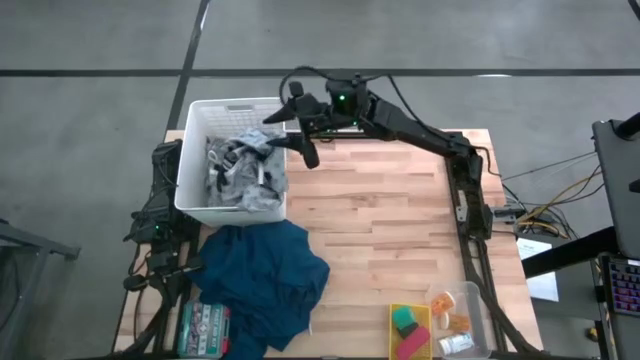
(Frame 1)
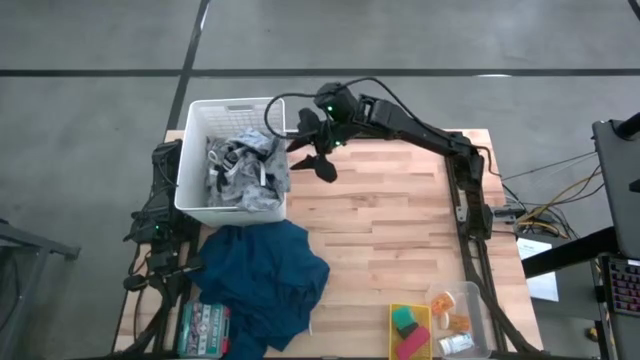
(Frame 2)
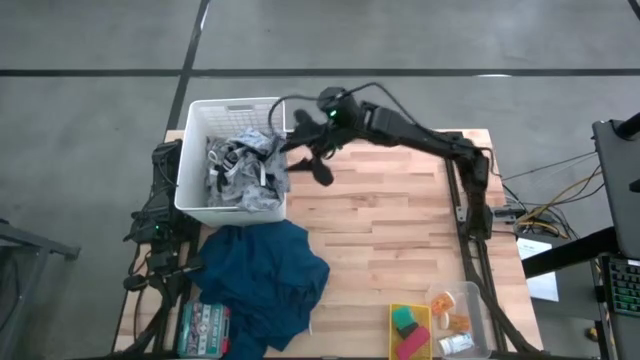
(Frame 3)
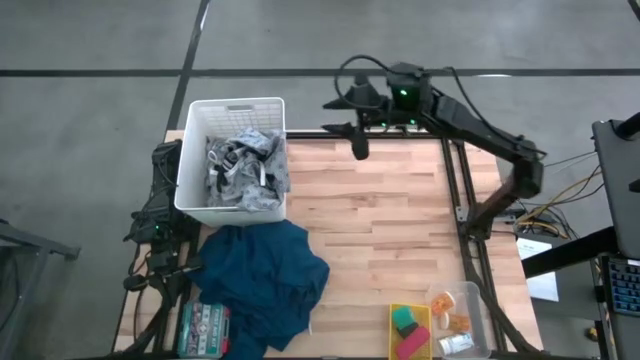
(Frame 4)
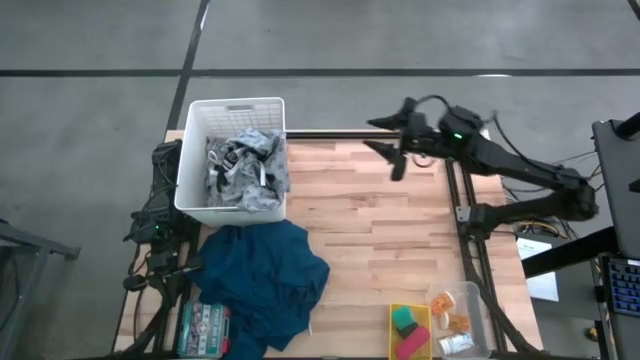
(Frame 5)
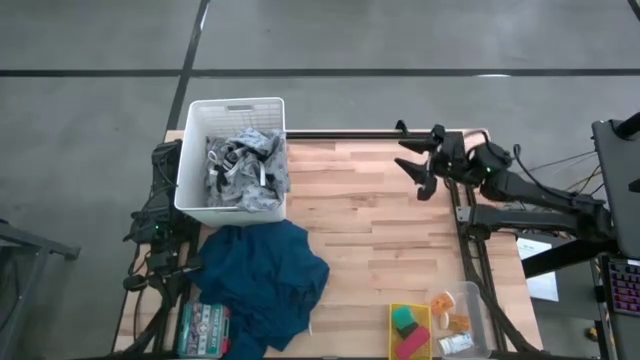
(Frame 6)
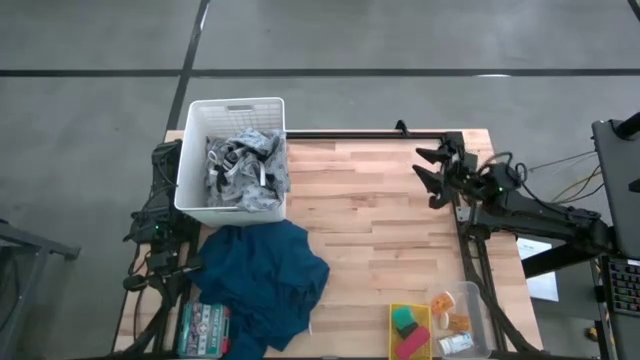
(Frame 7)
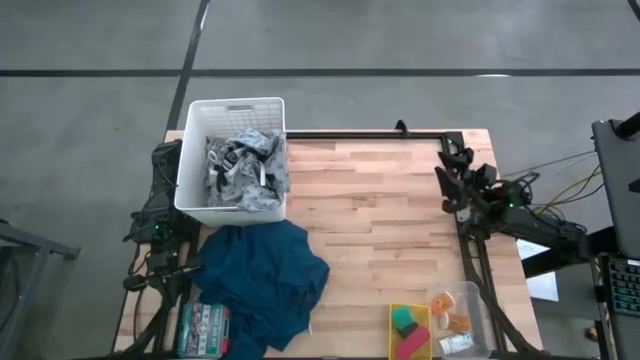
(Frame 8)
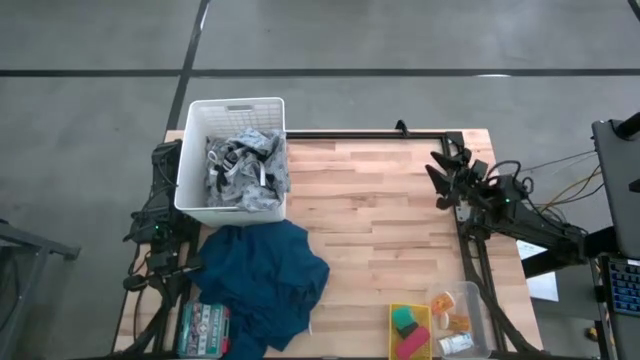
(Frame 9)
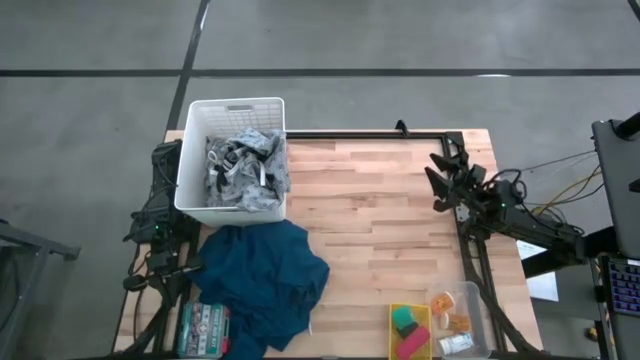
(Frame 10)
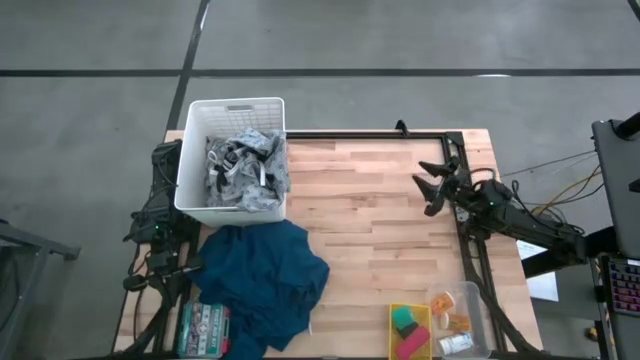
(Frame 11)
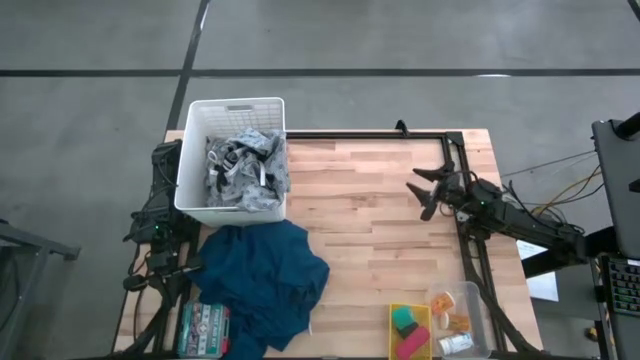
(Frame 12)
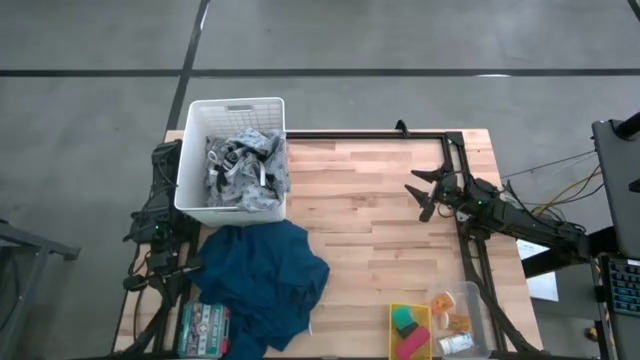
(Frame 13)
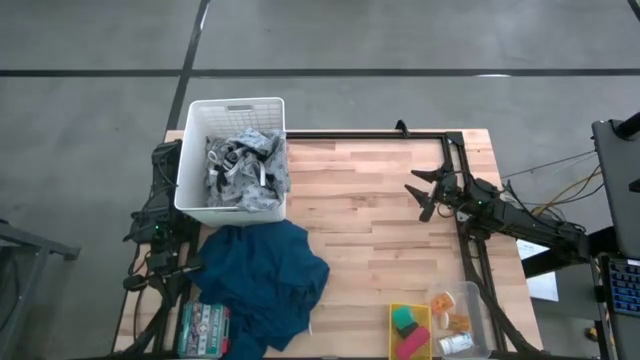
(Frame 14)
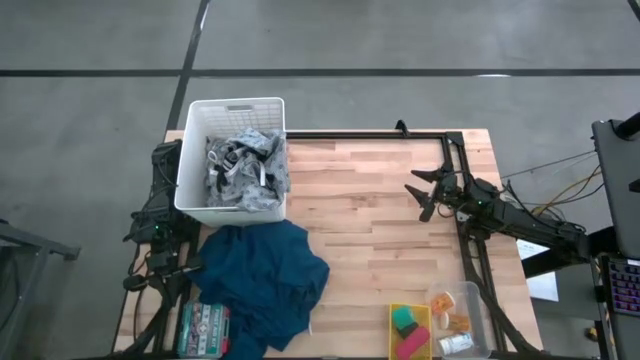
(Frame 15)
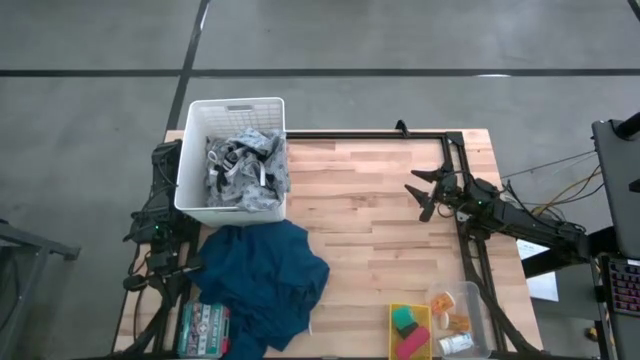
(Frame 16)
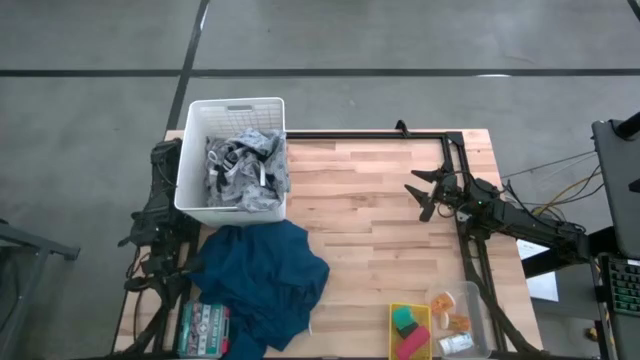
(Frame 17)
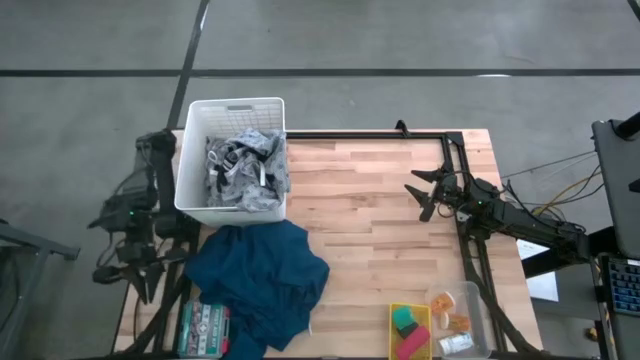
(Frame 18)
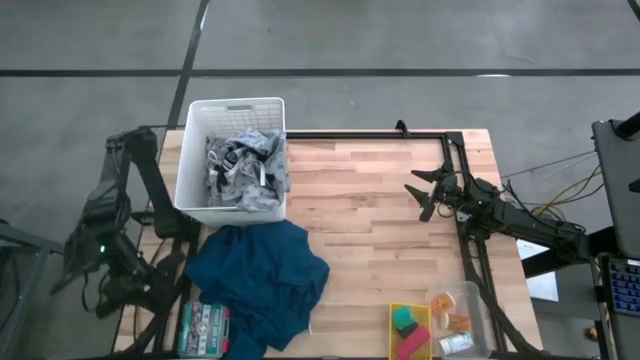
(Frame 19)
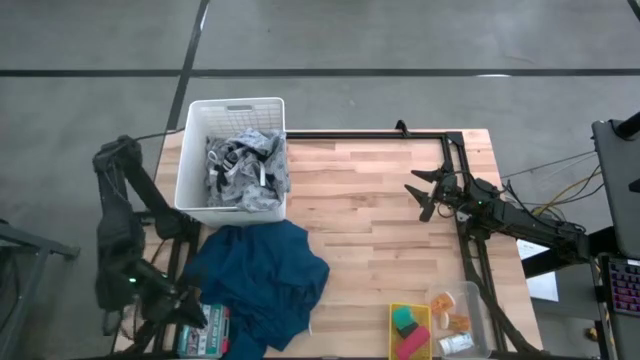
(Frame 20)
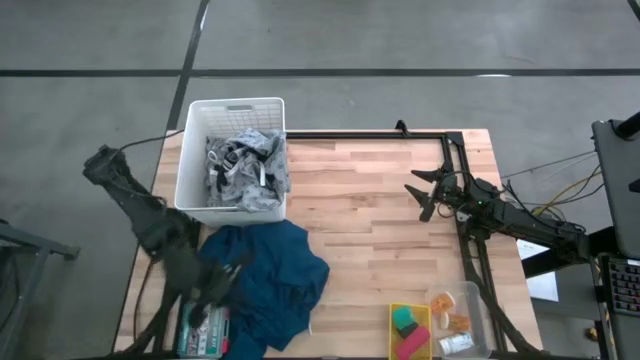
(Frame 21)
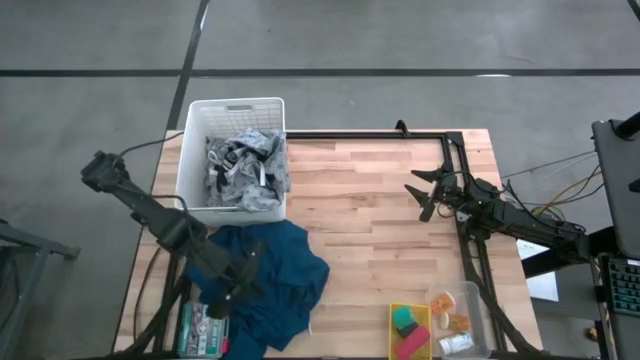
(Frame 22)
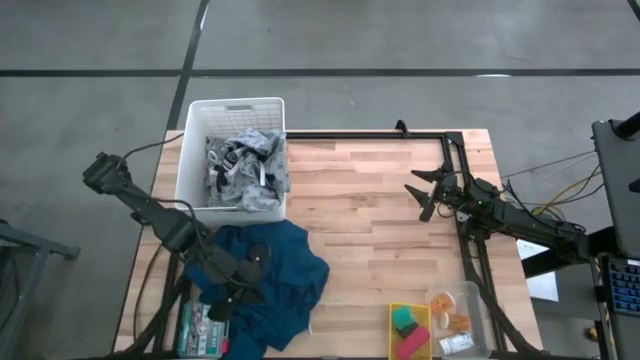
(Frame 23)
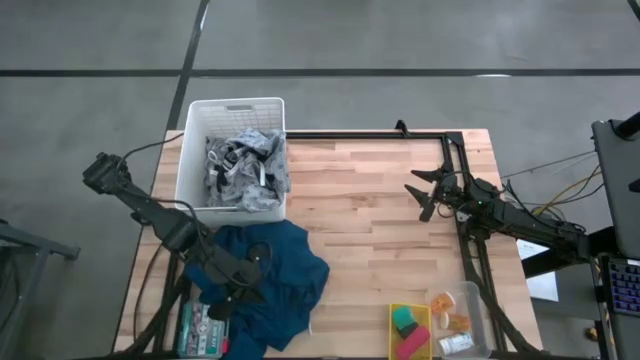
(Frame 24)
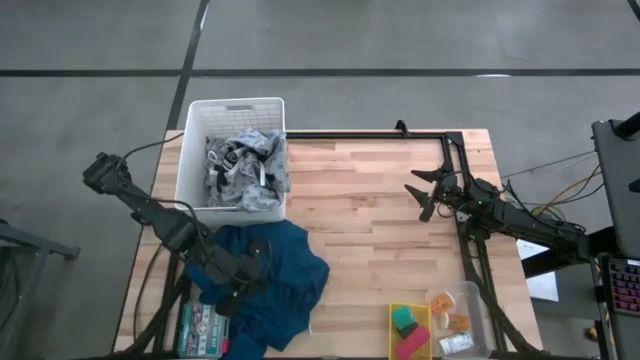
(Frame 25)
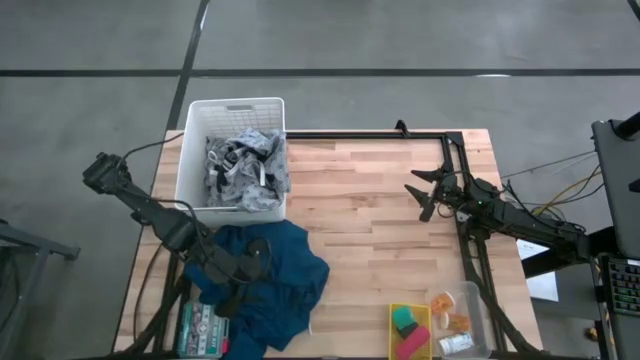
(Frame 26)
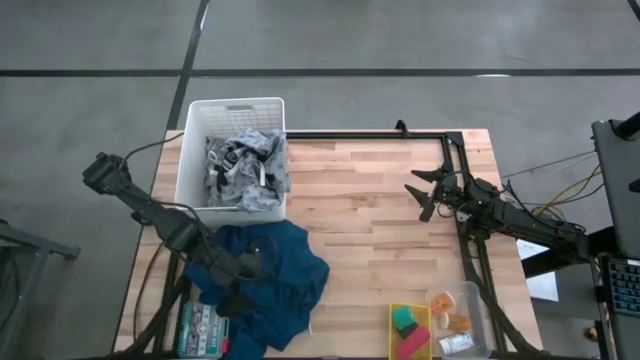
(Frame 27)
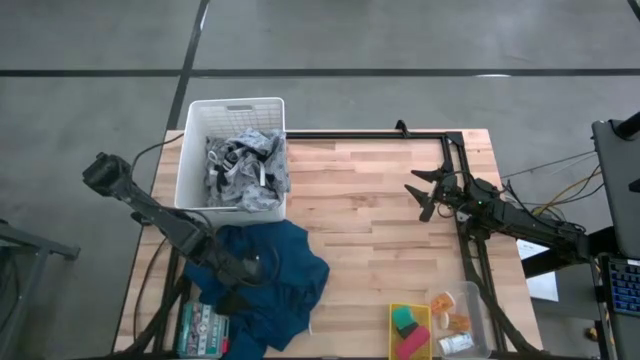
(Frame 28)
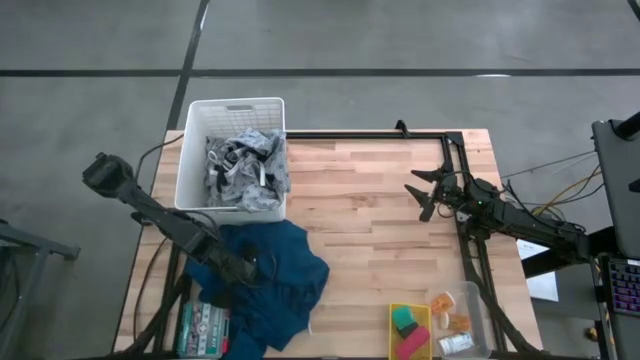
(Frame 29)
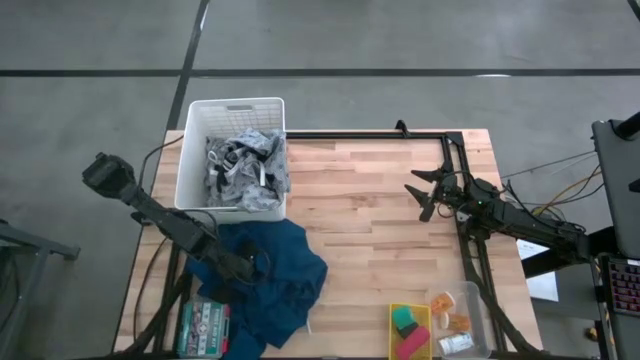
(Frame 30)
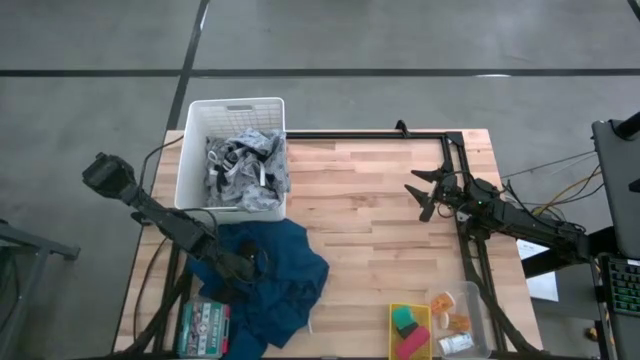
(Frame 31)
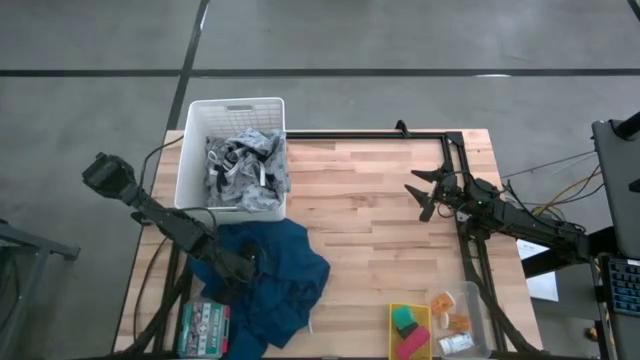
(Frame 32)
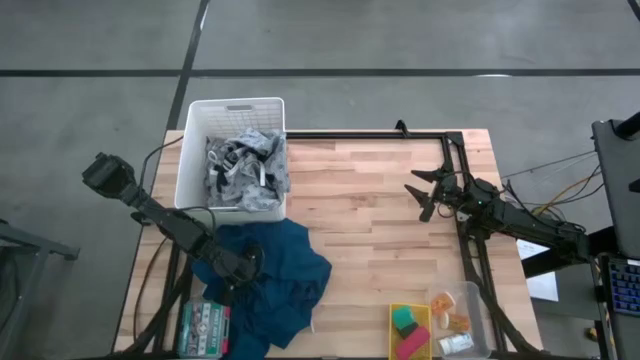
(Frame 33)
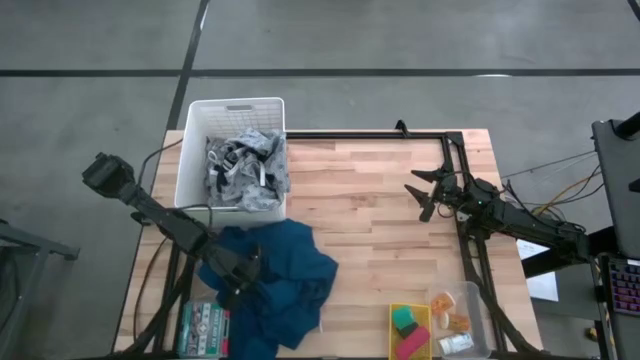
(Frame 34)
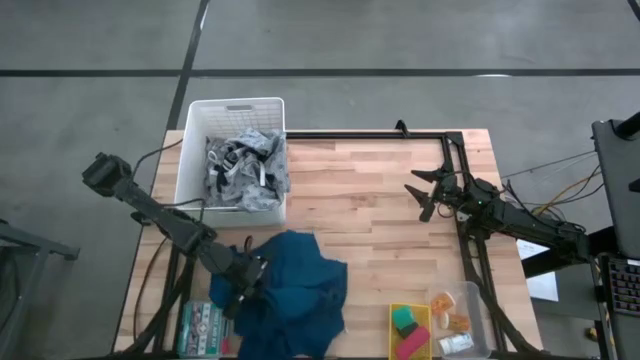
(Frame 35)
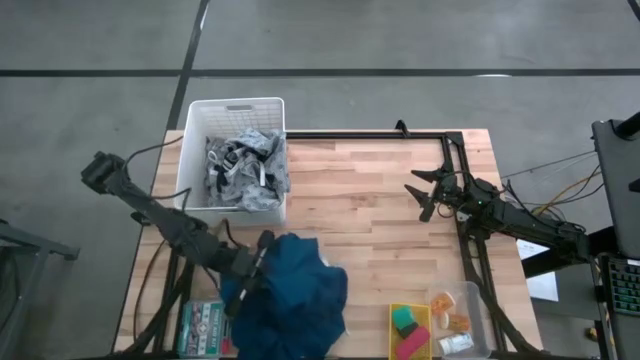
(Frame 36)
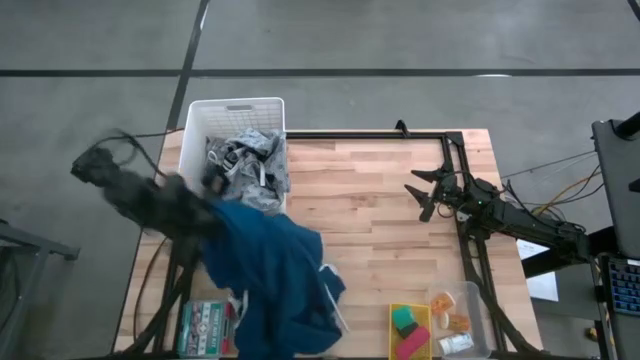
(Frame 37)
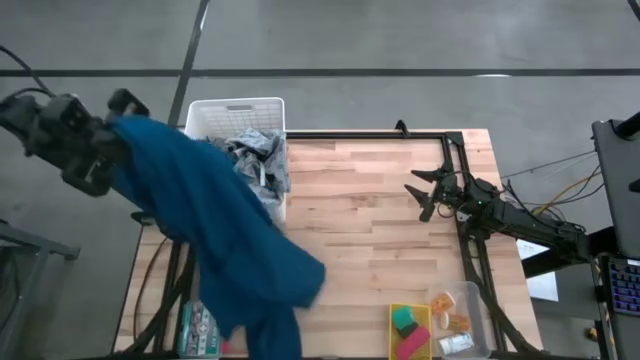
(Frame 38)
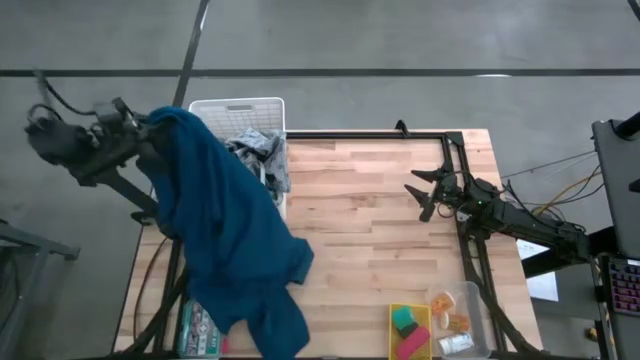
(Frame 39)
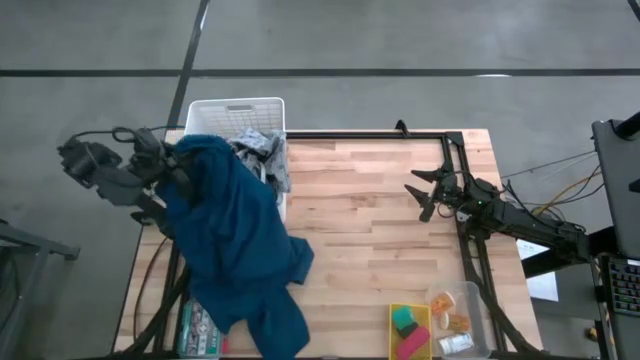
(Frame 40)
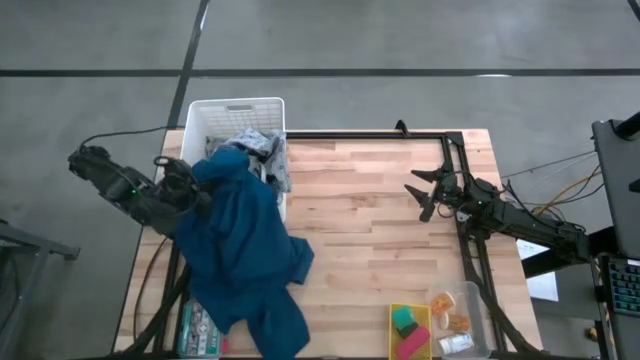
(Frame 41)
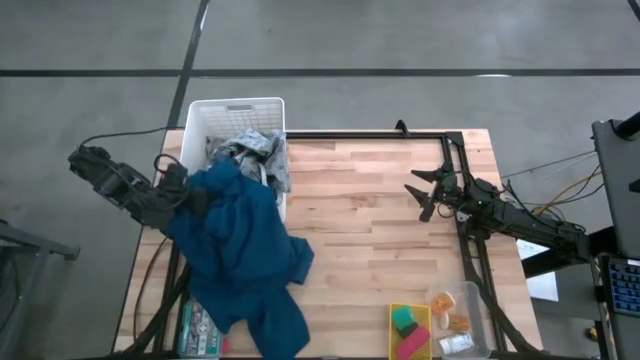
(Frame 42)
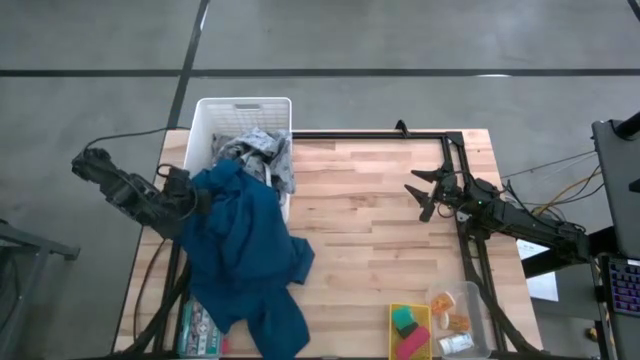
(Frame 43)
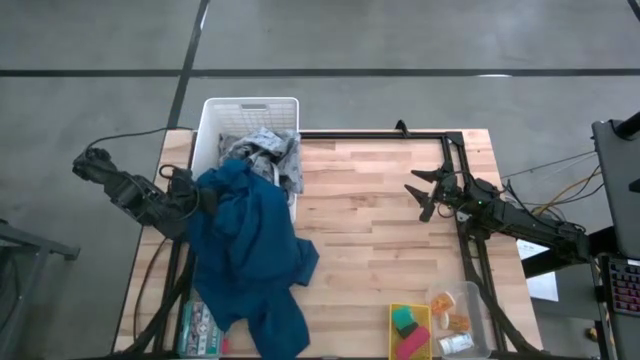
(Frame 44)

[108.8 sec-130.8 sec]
Task: Pick & Place Medicine items
Put the blue patient gown into the white laundry bin
